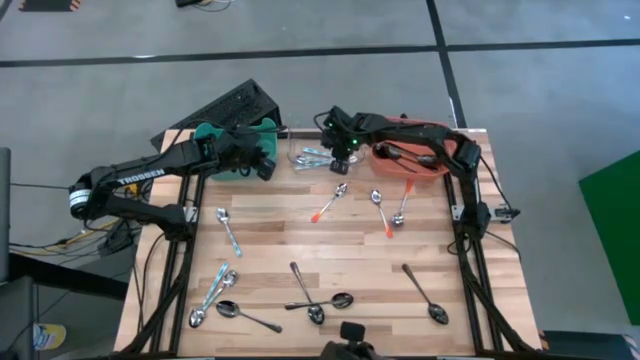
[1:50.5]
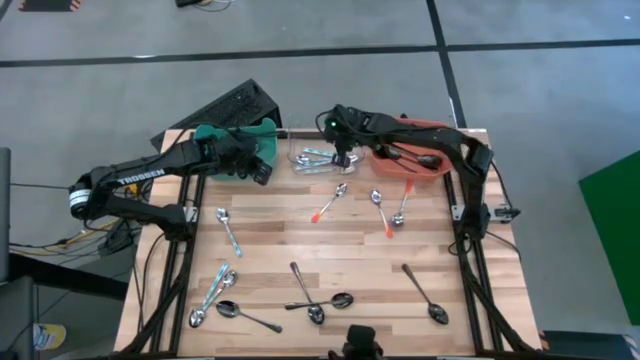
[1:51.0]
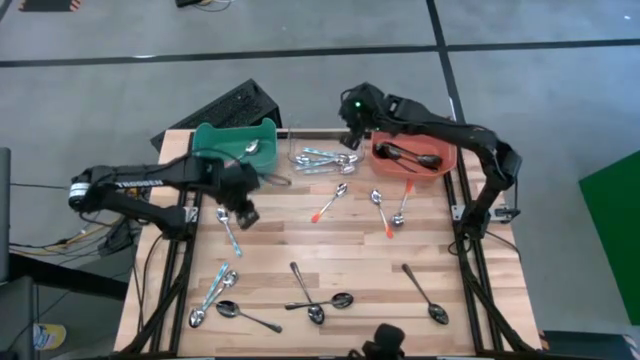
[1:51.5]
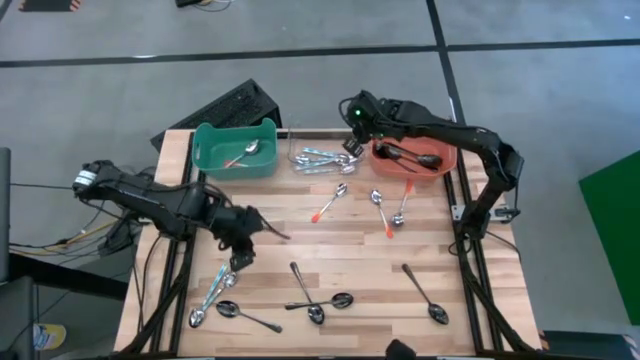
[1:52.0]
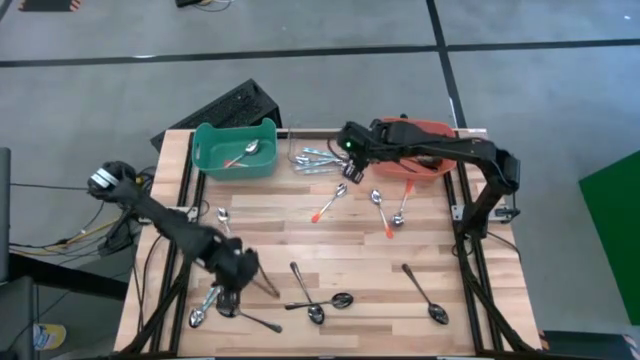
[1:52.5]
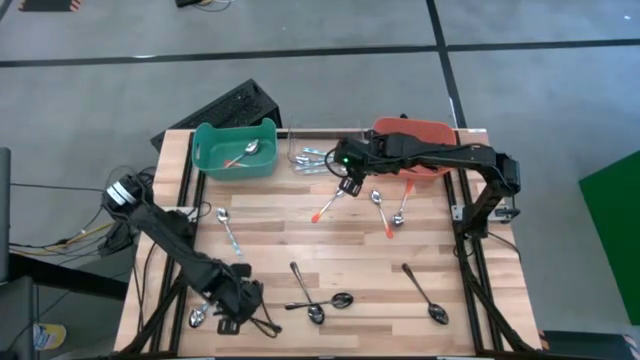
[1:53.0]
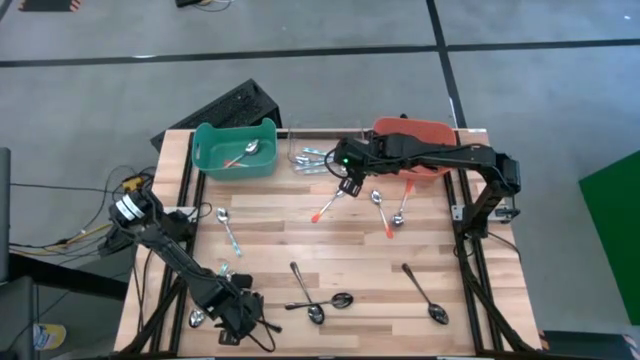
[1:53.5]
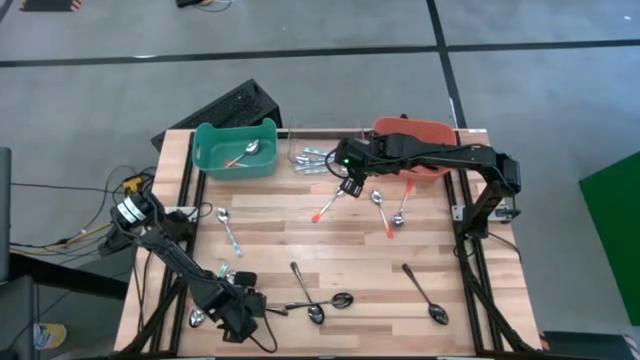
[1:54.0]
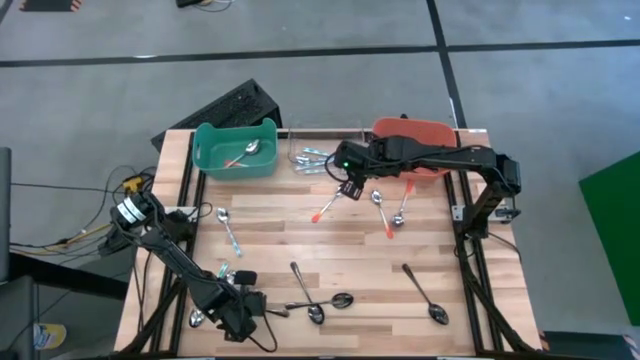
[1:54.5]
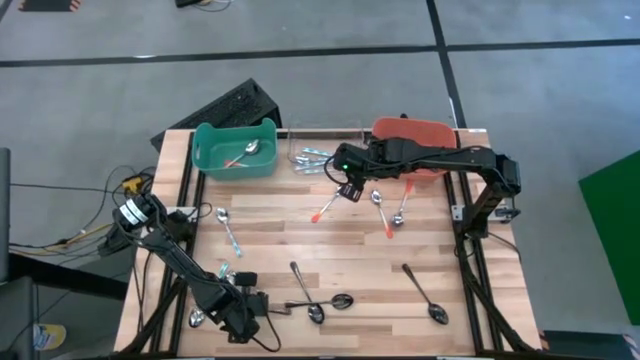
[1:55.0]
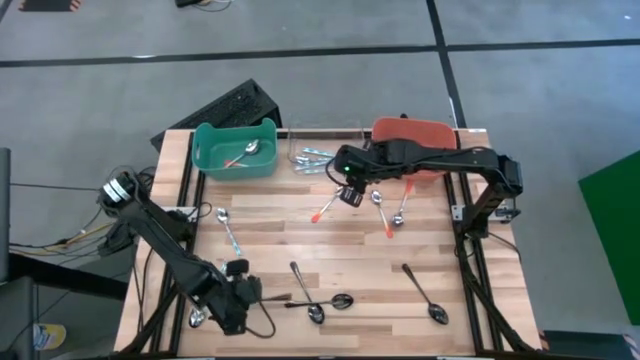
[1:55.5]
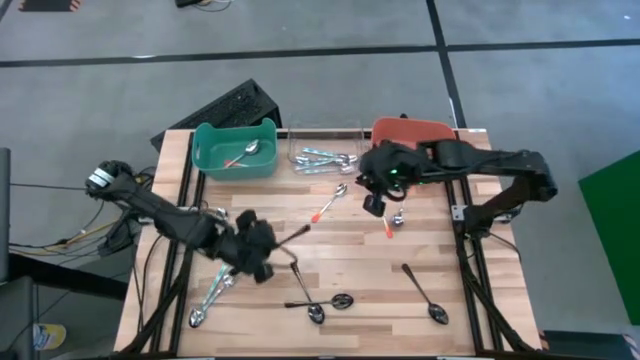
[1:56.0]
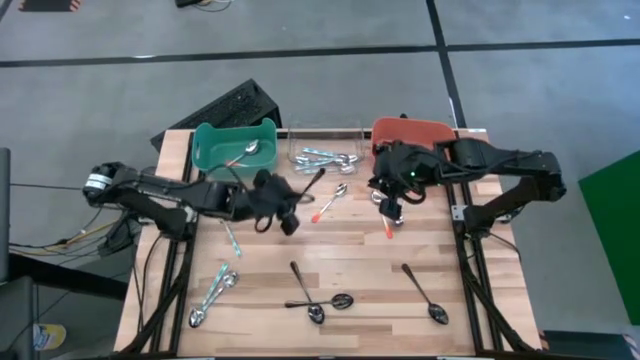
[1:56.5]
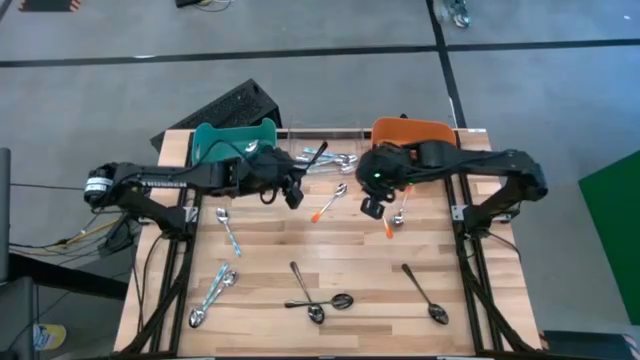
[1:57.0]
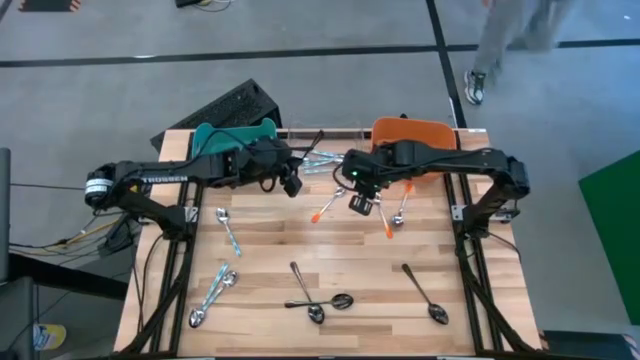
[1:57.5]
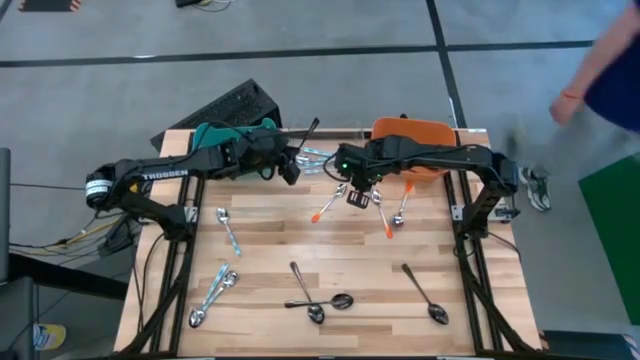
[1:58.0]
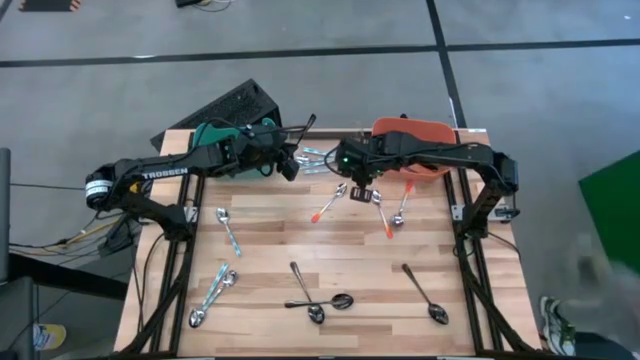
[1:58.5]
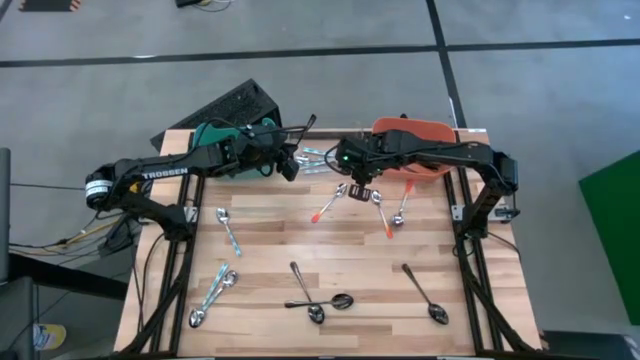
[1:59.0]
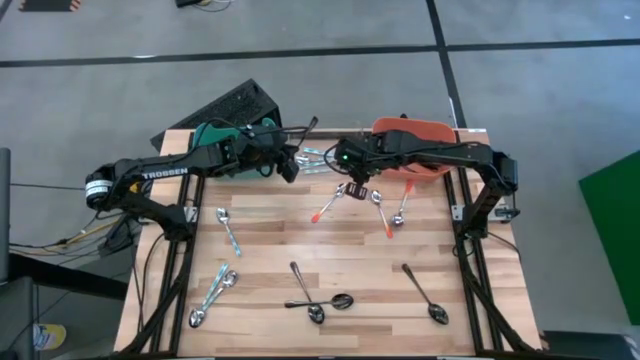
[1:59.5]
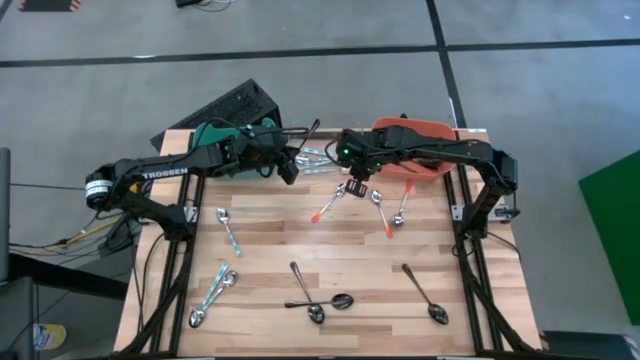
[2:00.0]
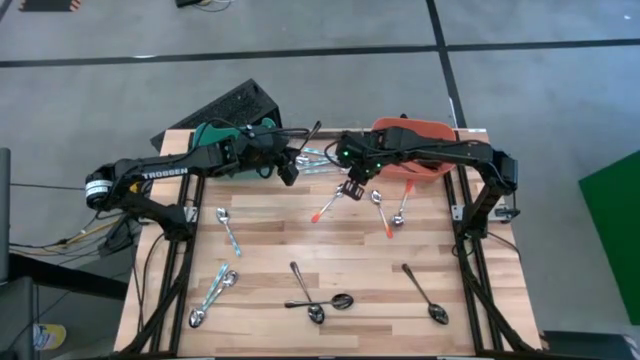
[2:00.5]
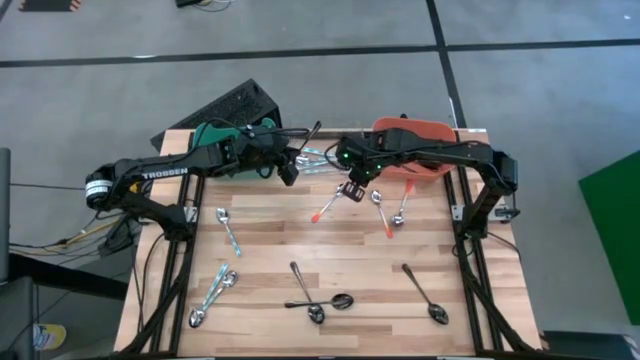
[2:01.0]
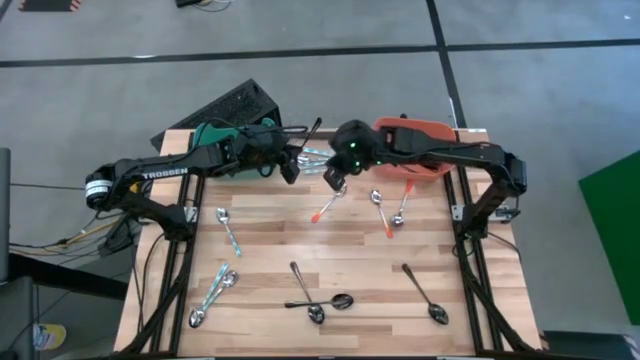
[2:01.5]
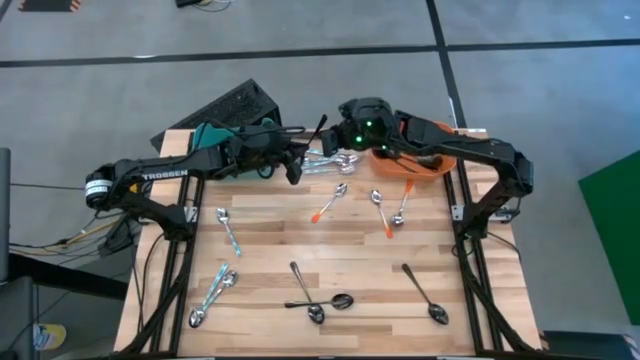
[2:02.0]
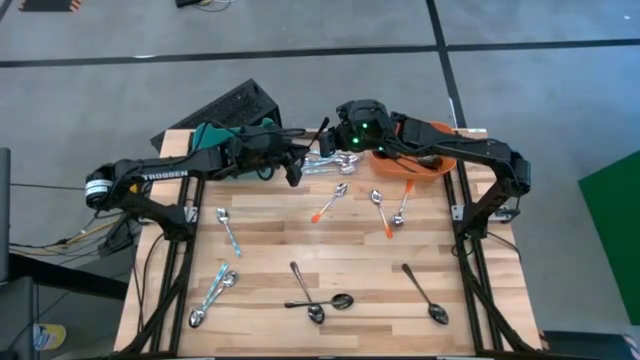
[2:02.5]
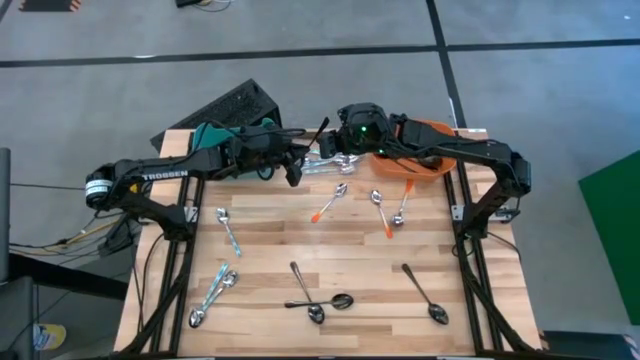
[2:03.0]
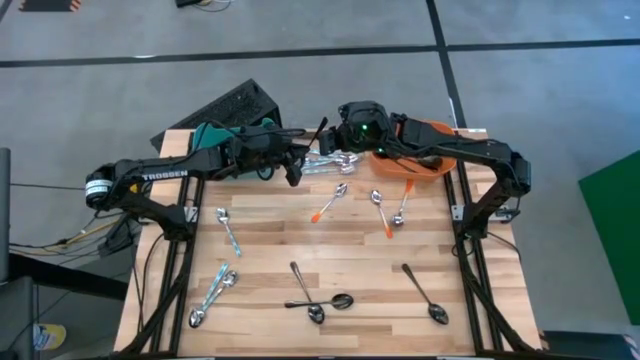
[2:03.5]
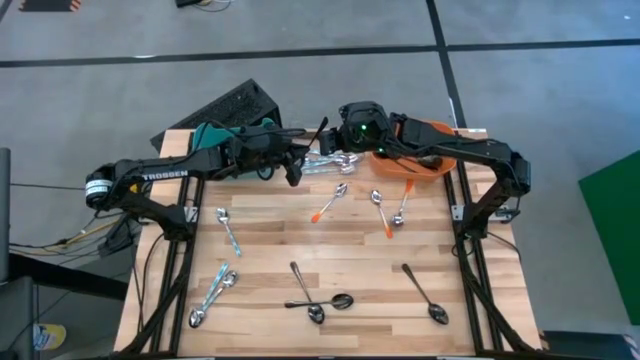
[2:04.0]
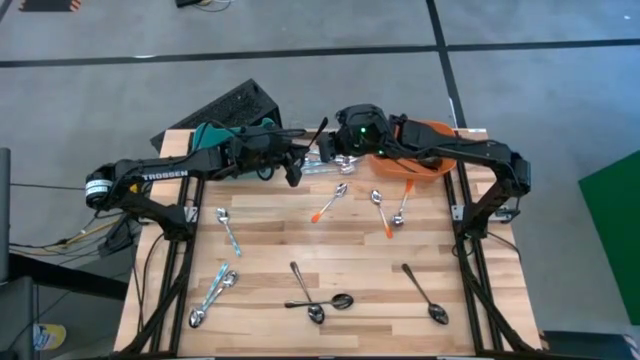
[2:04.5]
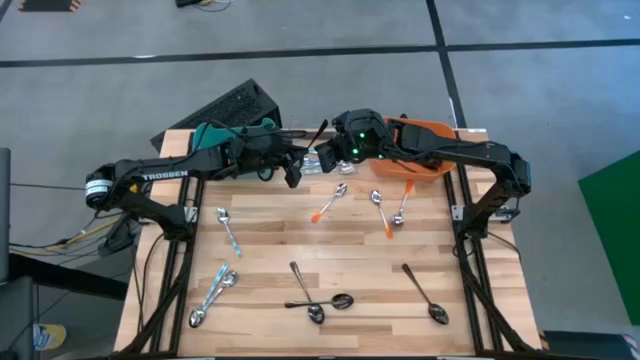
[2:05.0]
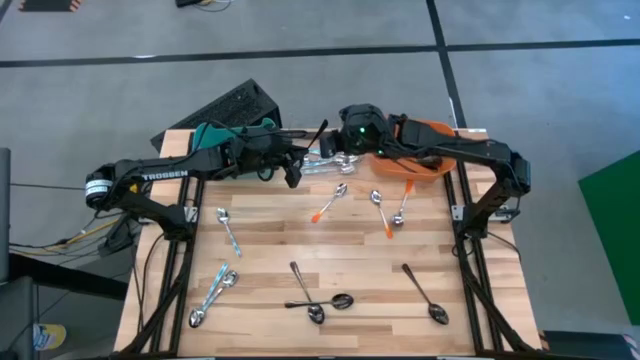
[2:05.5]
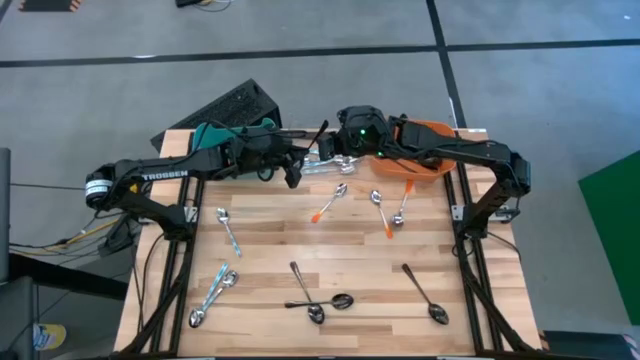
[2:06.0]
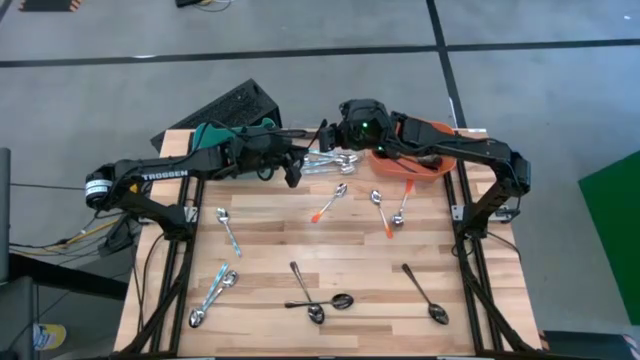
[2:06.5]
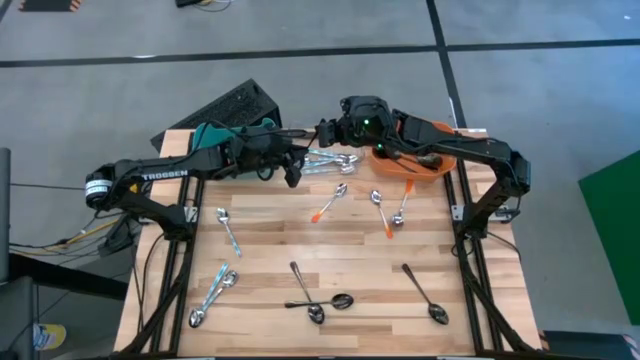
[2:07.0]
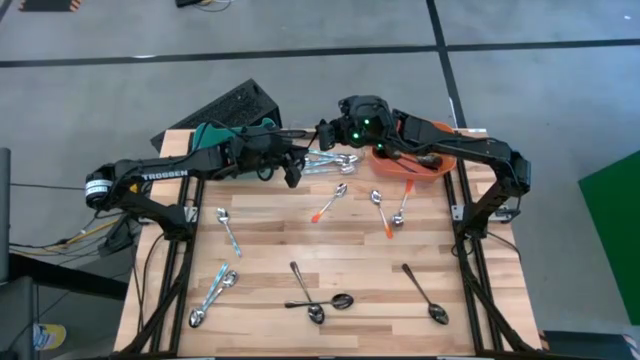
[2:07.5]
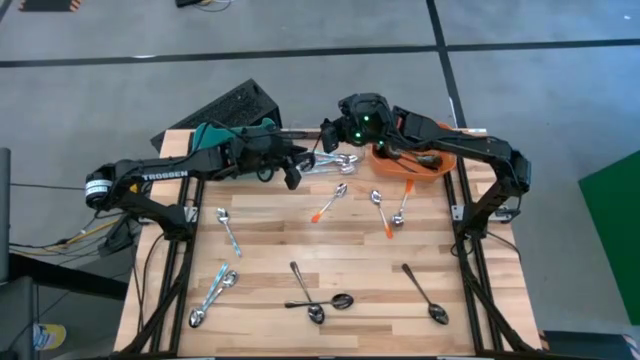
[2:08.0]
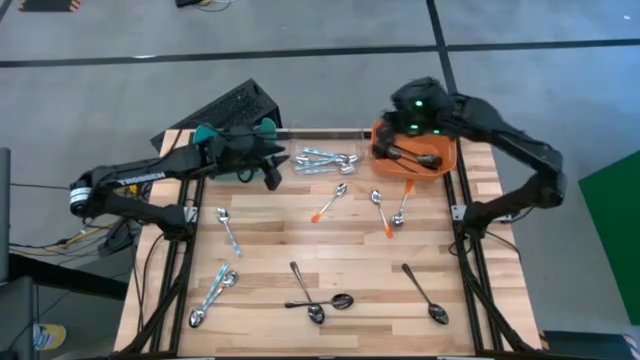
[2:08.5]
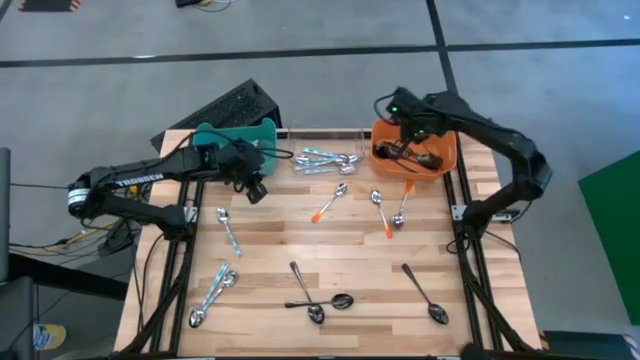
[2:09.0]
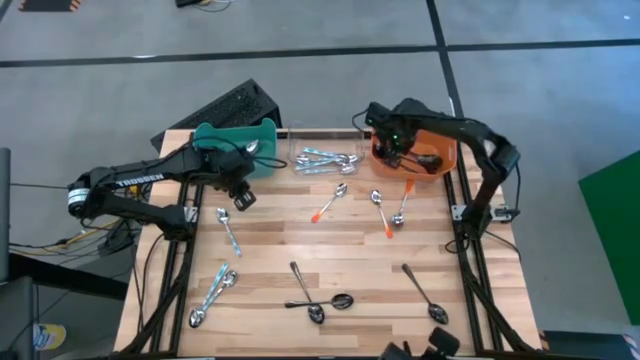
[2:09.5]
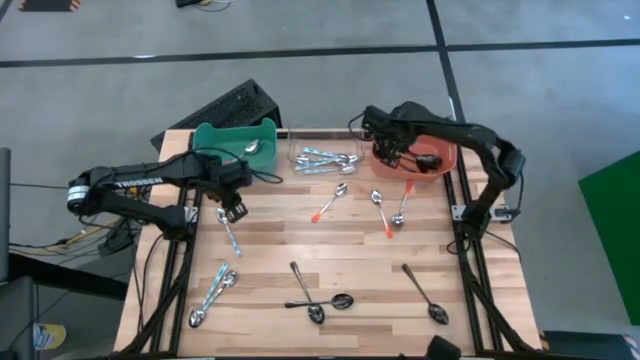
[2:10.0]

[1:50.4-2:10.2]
Task: Sort silverware by color (type)
Put the black spoon into the orange bin

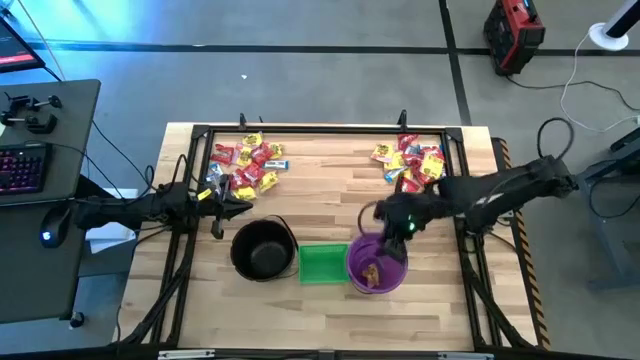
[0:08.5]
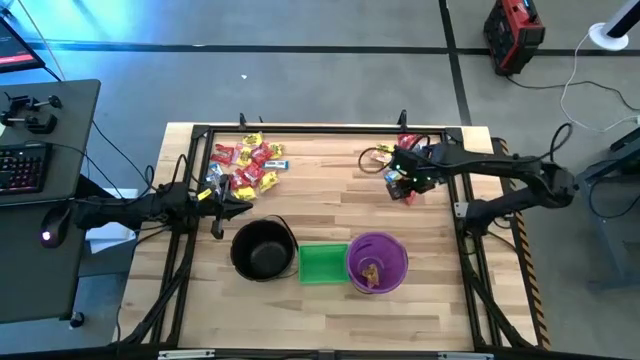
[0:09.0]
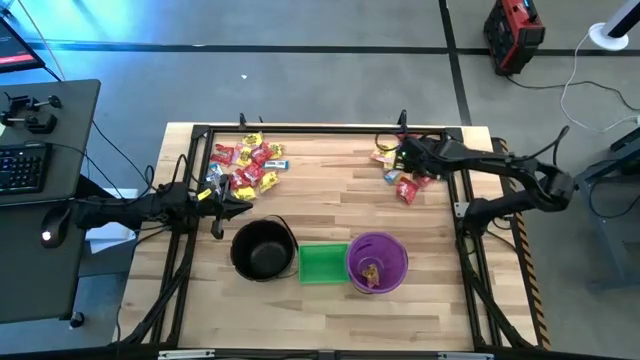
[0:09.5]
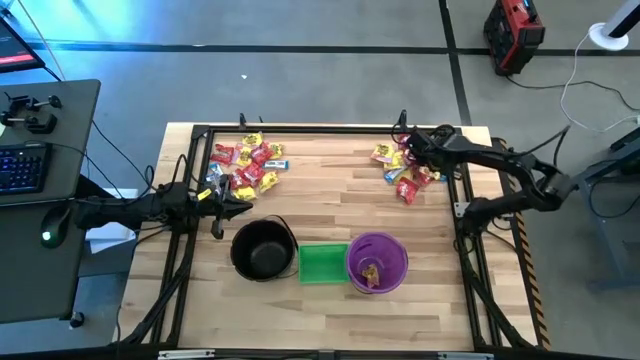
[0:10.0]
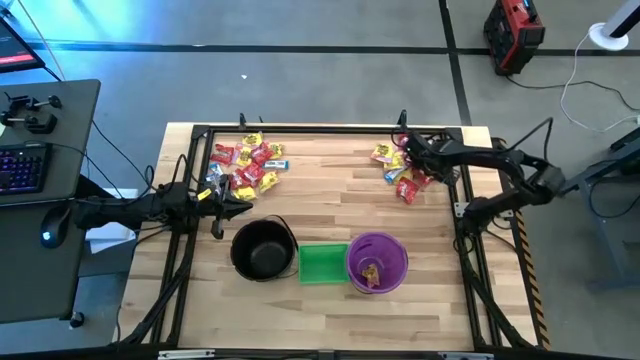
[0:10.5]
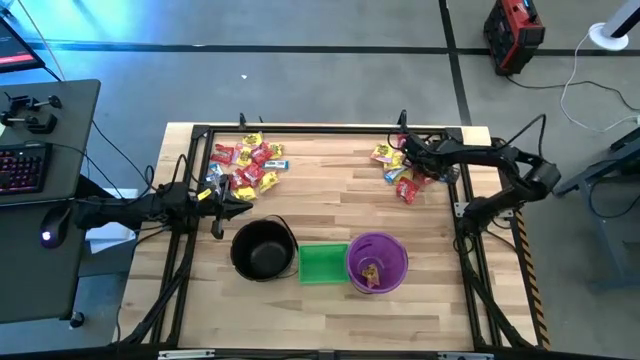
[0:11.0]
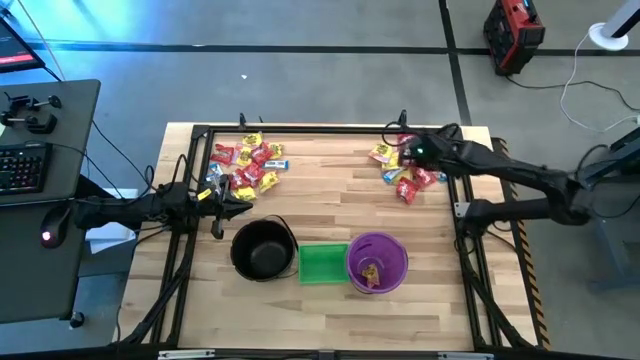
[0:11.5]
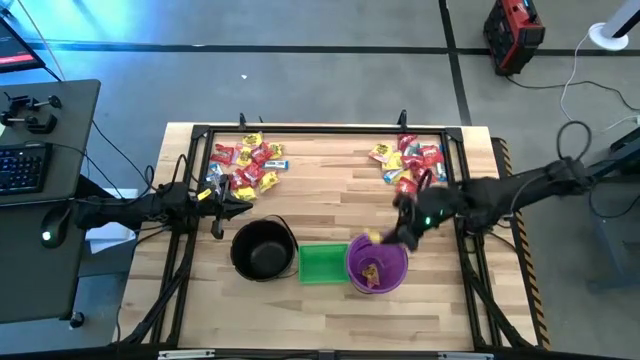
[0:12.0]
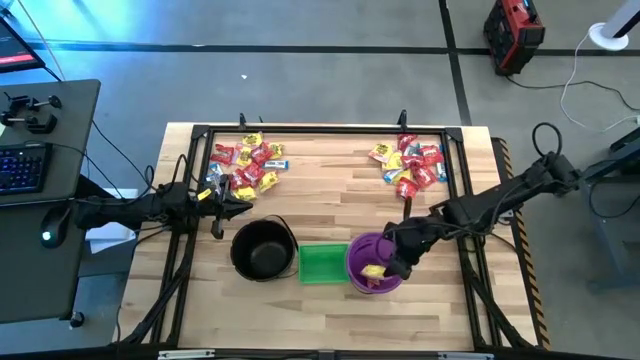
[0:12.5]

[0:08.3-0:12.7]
Task: Sort candy by brand, put in halloween buckets
Put the yellow candy into the violet bucket
